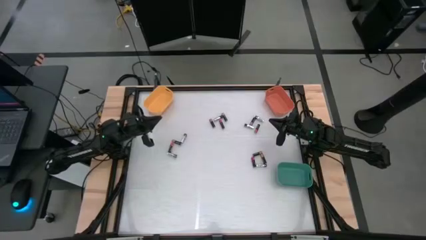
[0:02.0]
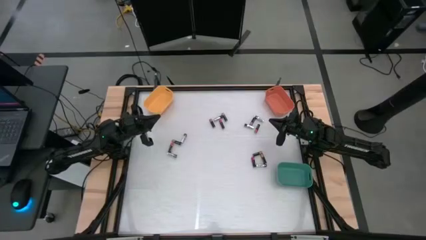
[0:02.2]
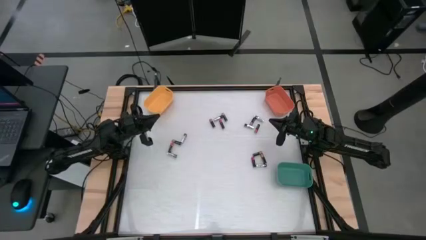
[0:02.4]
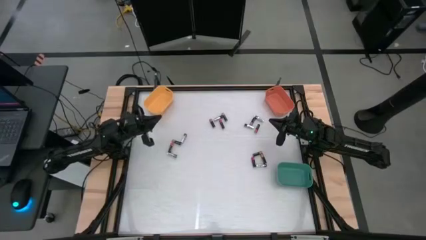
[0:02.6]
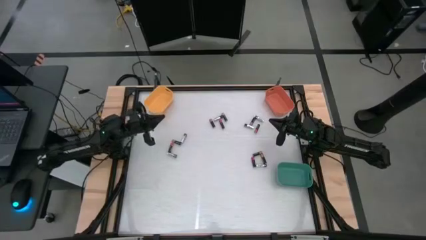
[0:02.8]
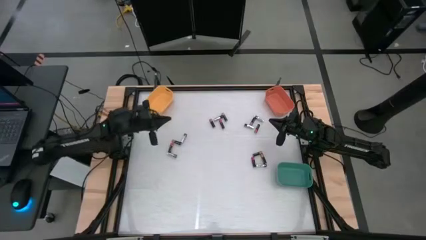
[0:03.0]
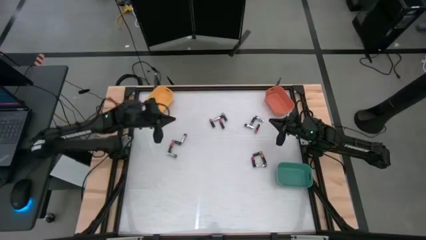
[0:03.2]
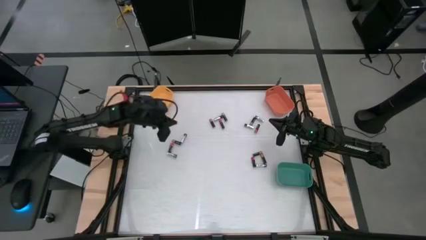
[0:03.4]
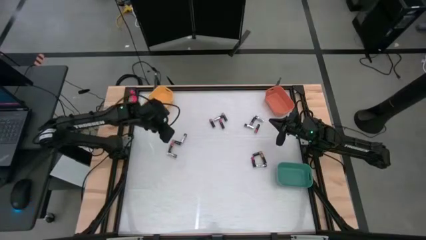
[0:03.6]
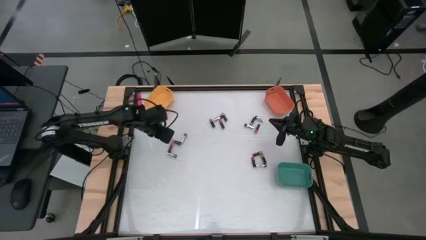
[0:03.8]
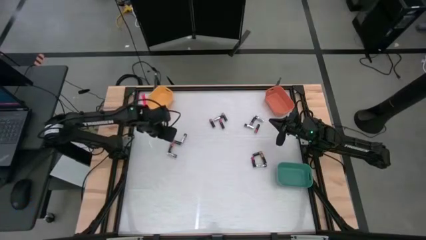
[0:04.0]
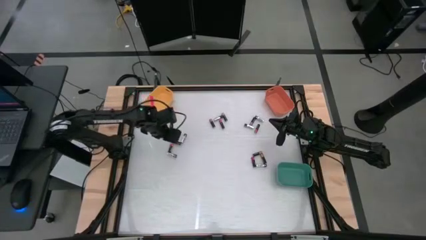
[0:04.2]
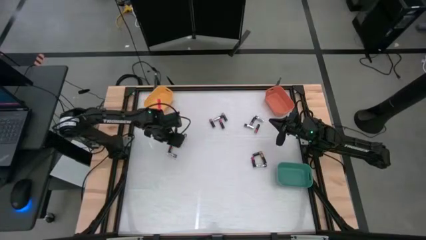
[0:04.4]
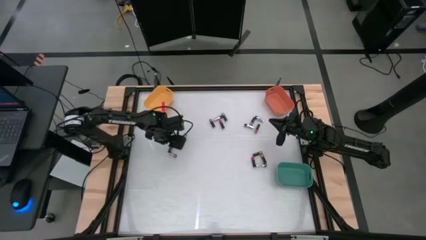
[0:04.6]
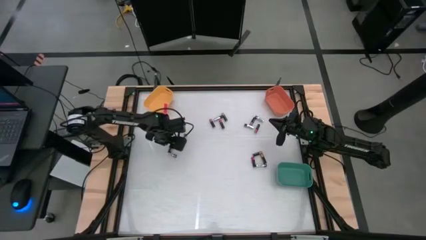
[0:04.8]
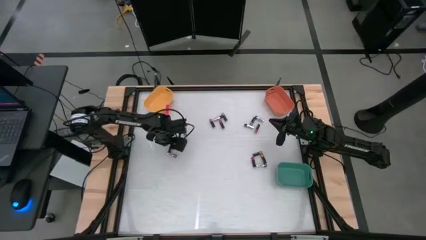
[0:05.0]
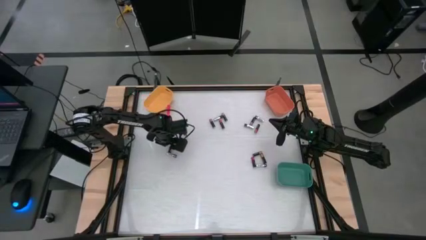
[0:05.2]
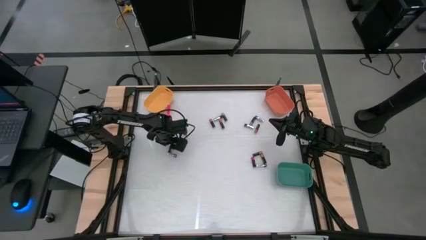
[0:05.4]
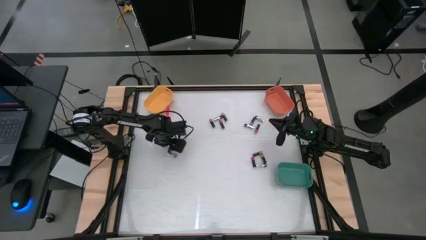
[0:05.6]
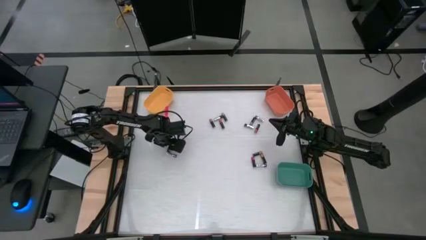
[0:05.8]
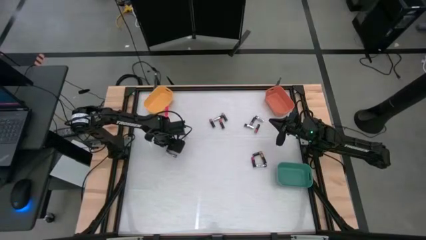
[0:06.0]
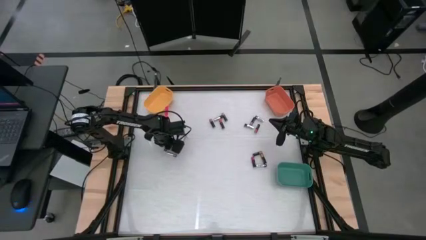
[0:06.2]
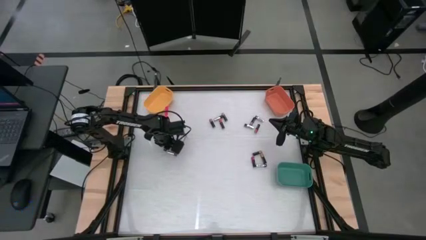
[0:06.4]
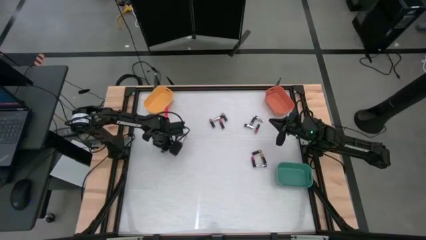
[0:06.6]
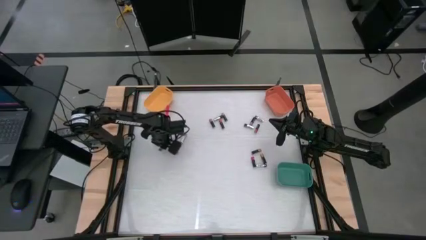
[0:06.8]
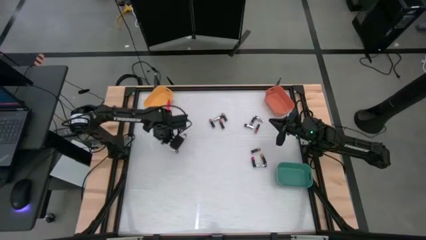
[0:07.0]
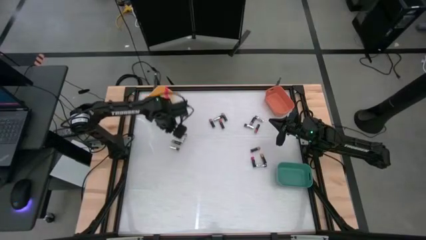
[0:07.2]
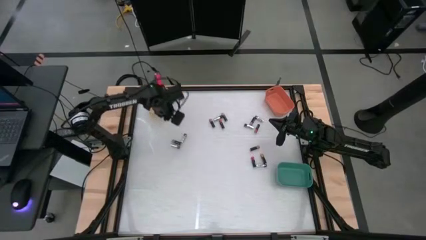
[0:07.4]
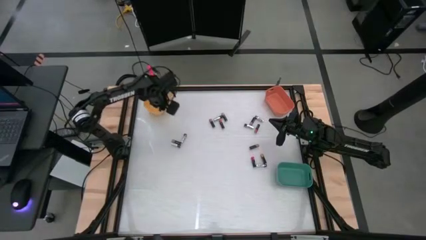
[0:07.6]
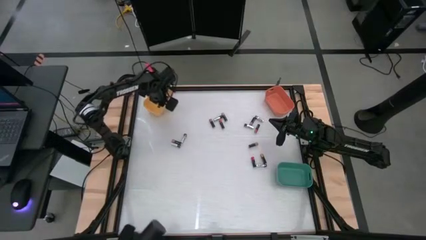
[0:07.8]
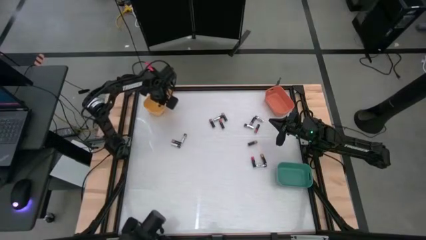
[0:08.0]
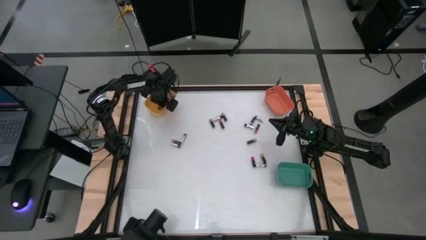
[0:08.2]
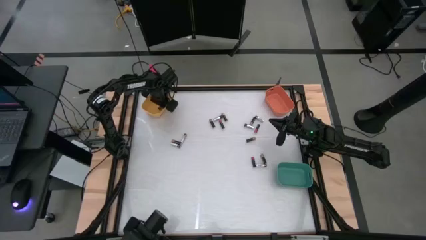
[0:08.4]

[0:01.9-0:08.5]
Task: Sort batteries
Put the red battery into the yellow bin

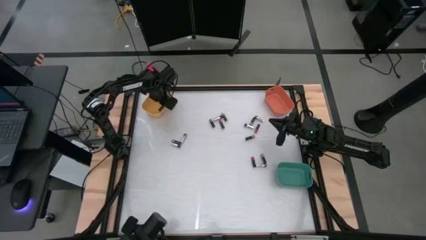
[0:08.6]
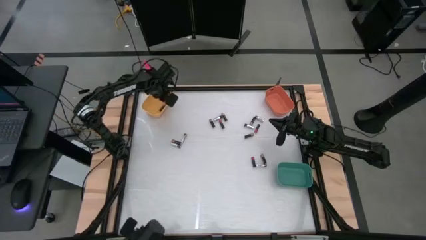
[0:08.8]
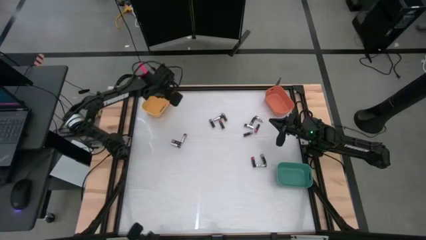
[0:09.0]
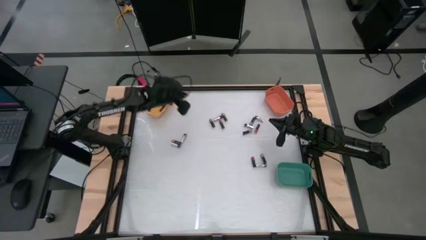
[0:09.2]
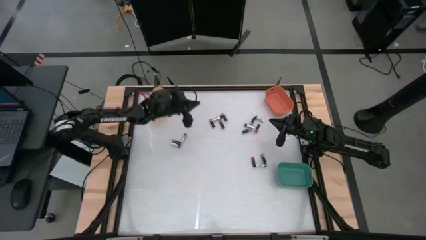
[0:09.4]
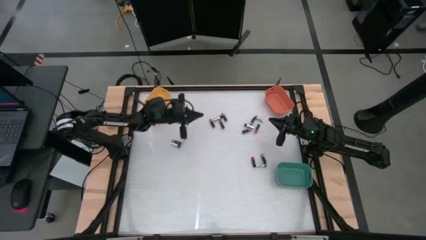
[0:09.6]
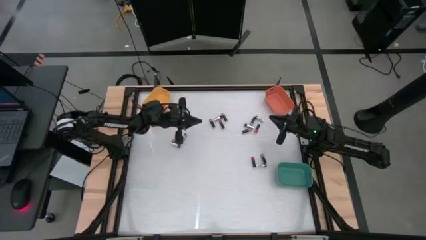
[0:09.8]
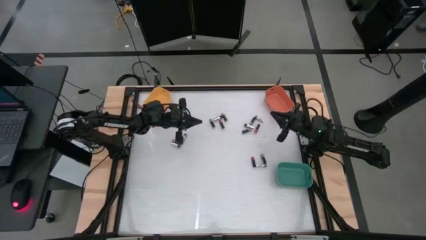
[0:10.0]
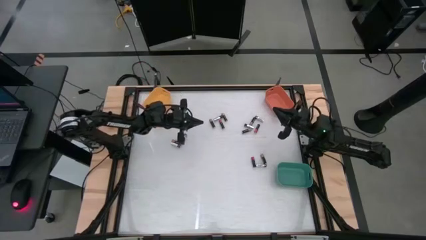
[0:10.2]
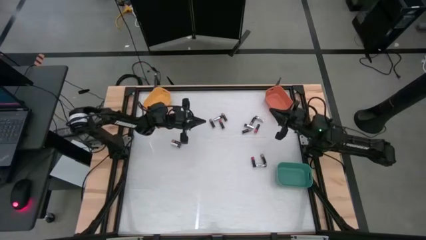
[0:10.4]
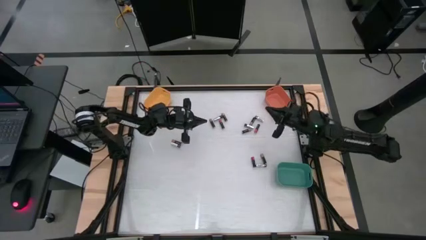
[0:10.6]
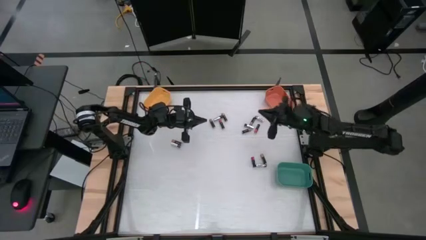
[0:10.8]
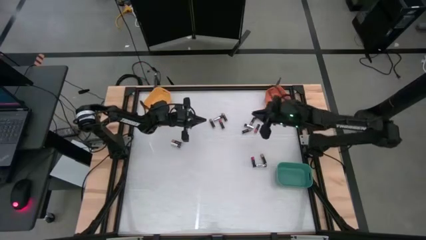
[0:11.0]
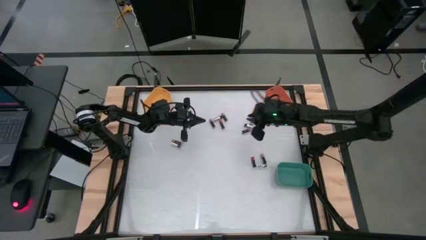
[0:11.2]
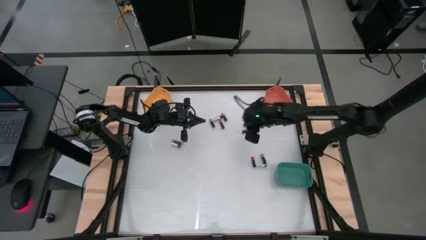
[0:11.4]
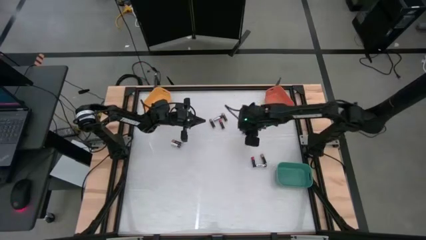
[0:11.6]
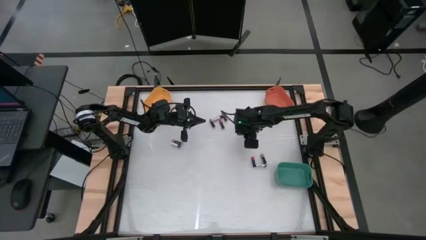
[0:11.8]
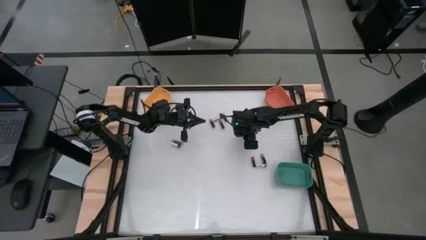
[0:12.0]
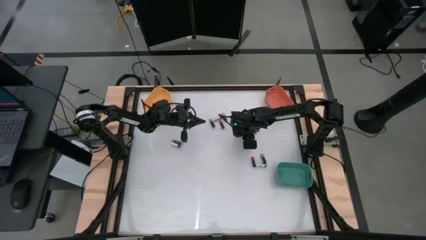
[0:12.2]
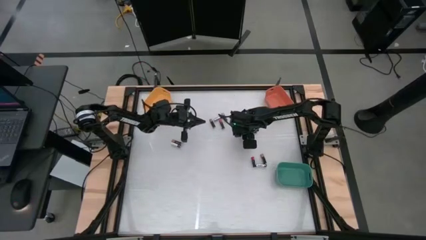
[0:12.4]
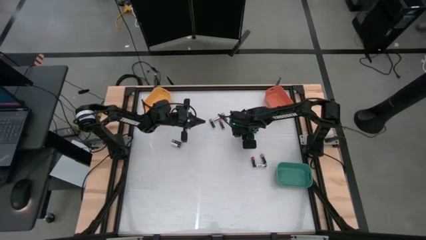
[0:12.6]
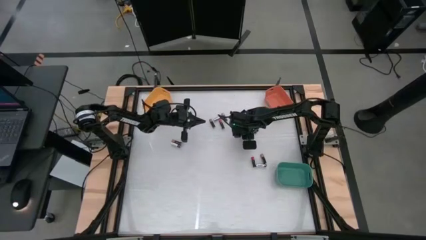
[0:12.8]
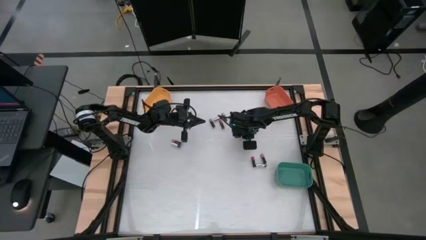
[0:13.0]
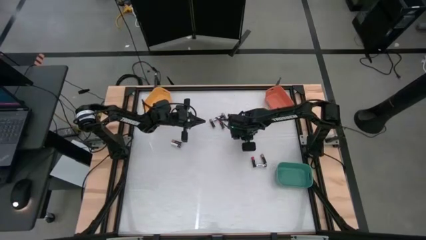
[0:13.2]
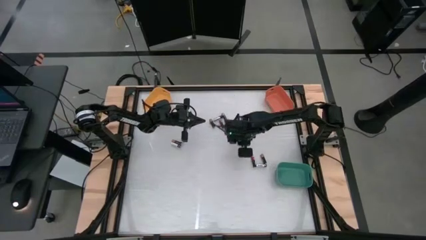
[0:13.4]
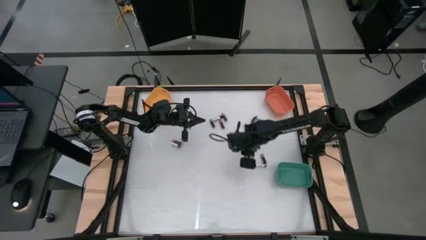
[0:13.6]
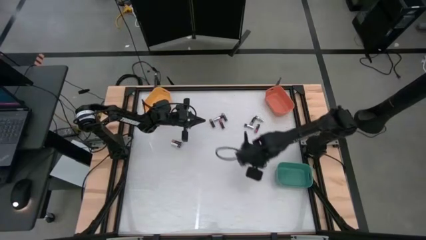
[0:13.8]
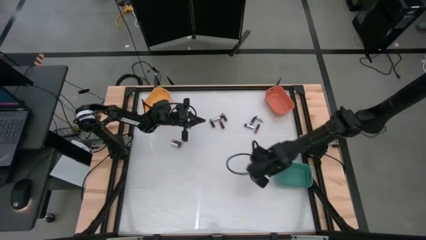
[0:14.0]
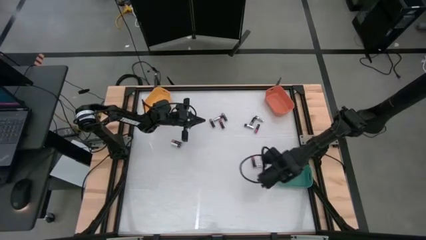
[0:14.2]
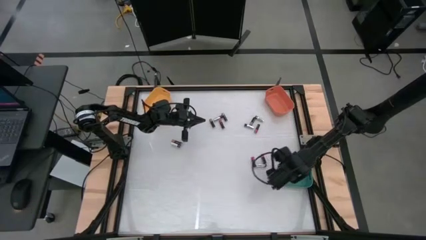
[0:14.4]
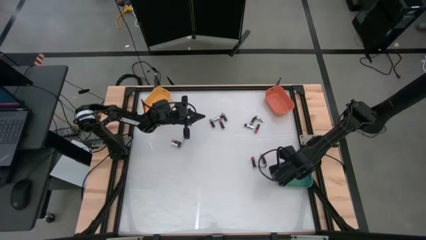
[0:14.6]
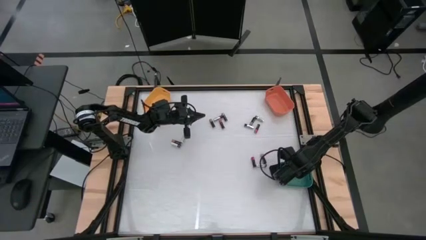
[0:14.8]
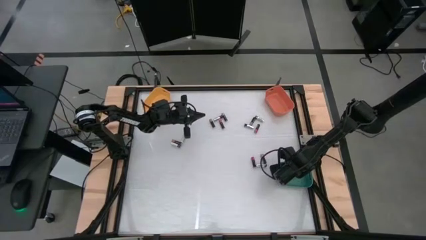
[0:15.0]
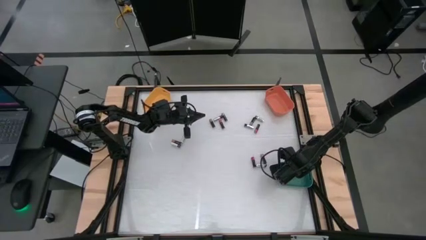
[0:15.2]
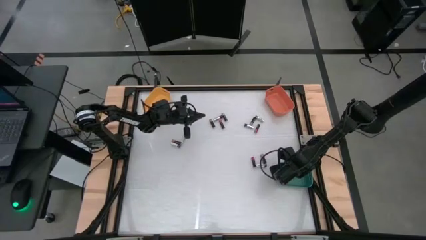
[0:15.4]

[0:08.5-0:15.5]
Put the brown battery into the green bin

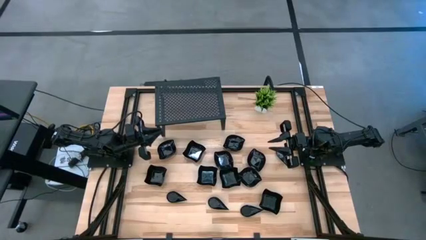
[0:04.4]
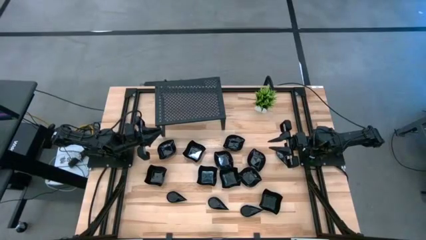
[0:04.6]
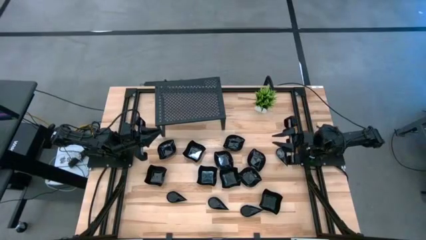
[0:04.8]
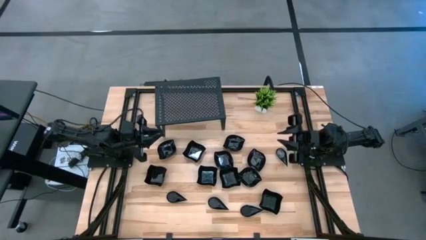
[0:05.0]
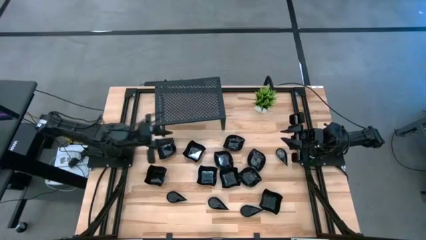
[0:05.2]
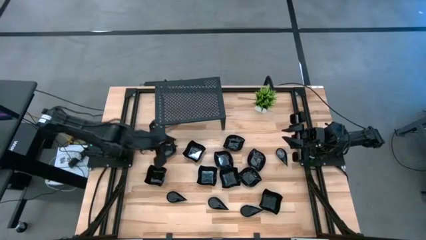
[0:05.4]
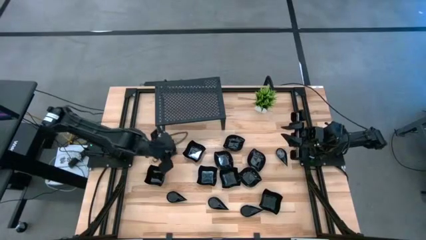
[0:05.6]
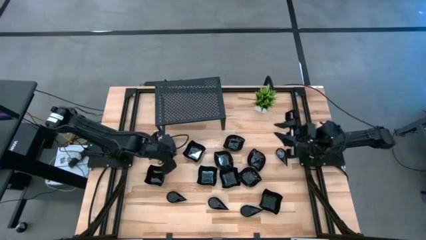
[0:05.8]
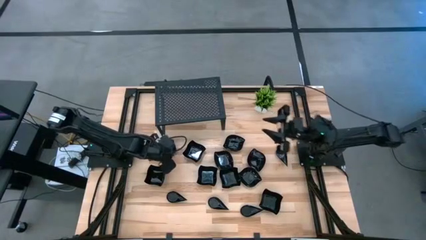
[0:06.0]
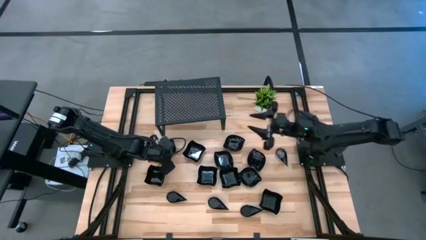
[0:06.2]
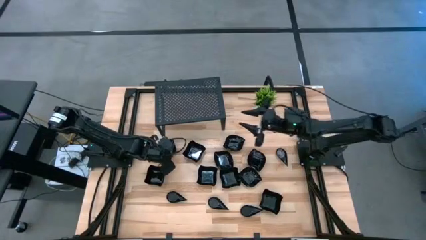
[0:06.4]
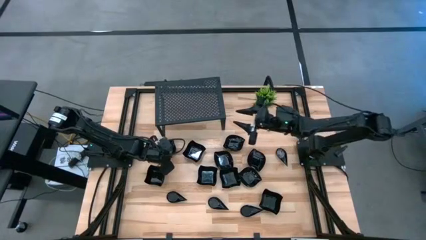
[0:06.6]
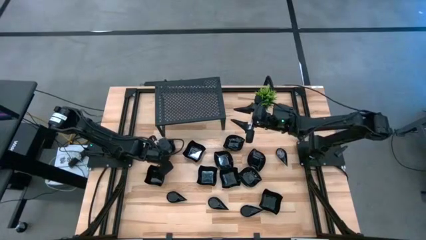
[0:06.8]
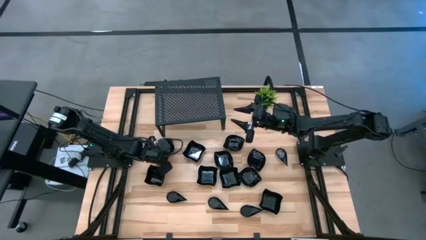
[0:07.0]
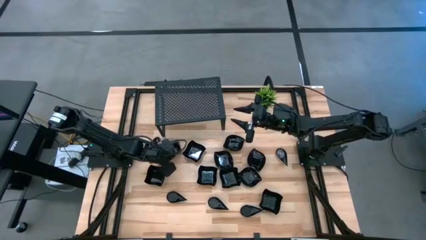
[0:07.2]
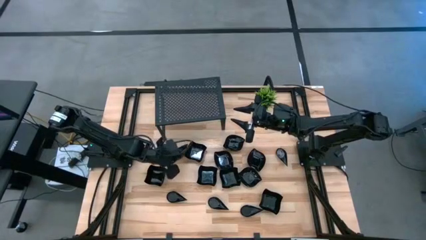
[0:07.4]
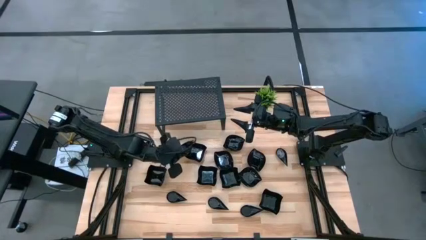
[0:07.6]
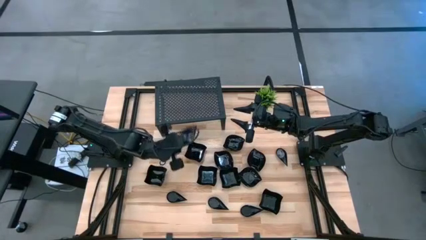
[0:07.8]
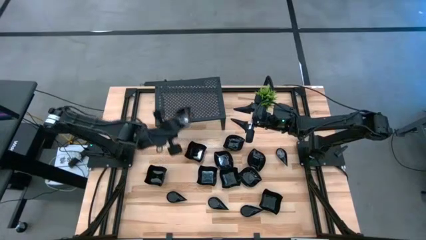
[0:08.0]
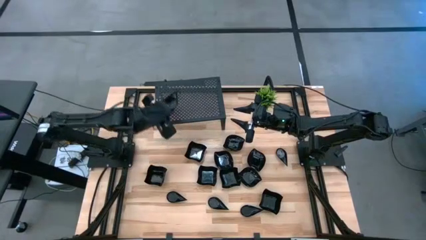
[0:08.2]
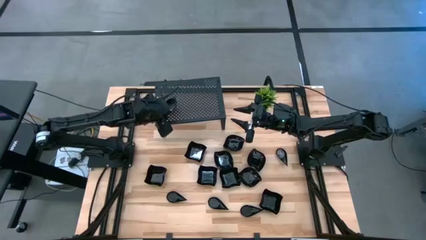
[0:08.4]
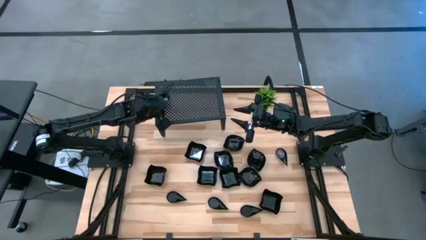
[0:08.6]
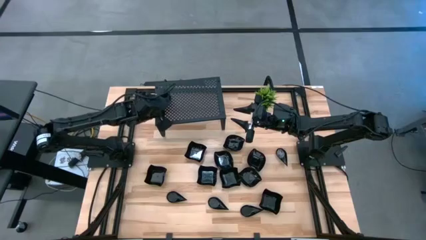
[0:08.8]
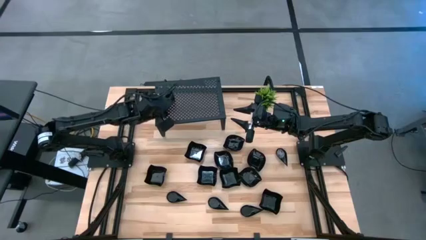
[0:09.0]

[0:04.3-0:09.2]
Task: Pick & Place Mini shaped plates
Put the black leaf shaped plate on the shelf
